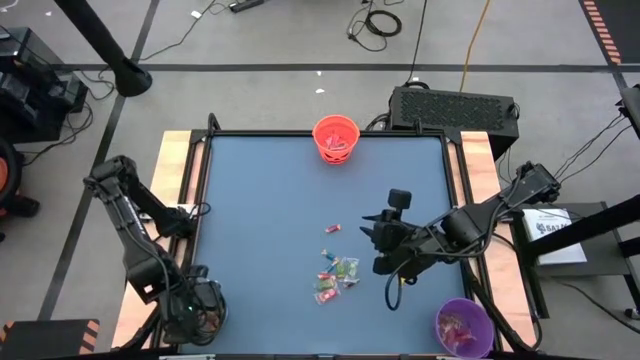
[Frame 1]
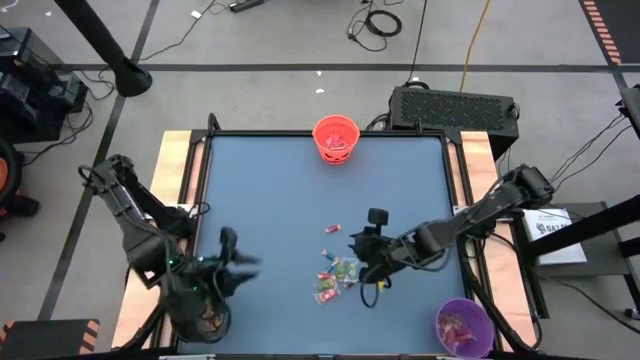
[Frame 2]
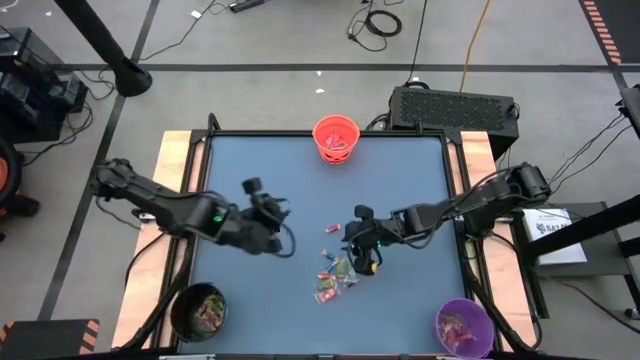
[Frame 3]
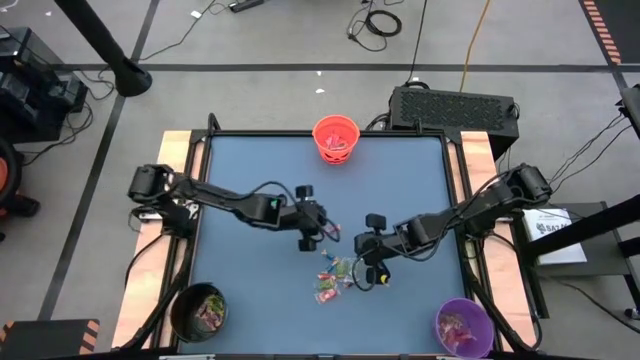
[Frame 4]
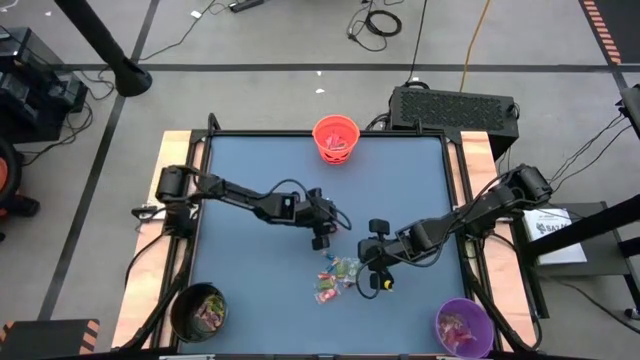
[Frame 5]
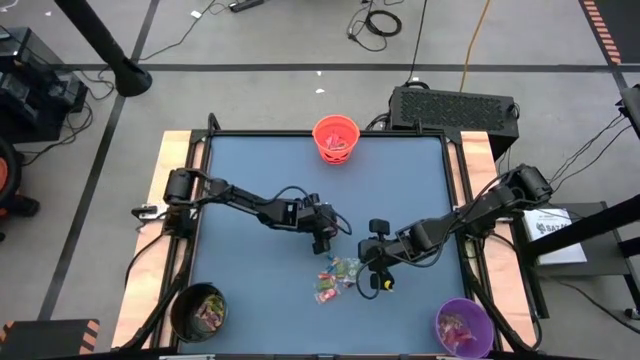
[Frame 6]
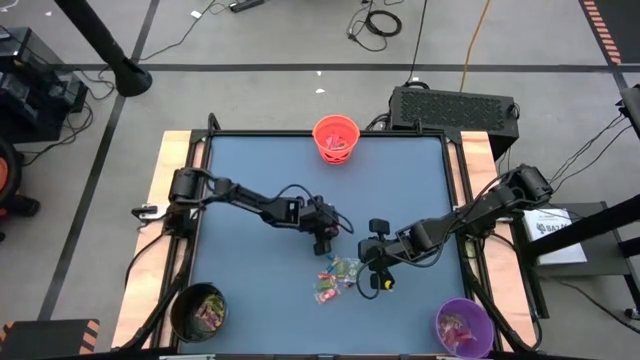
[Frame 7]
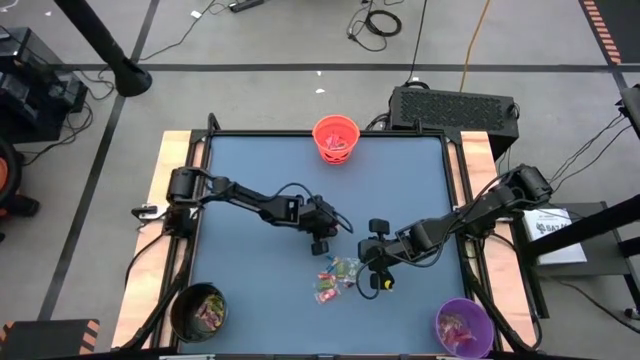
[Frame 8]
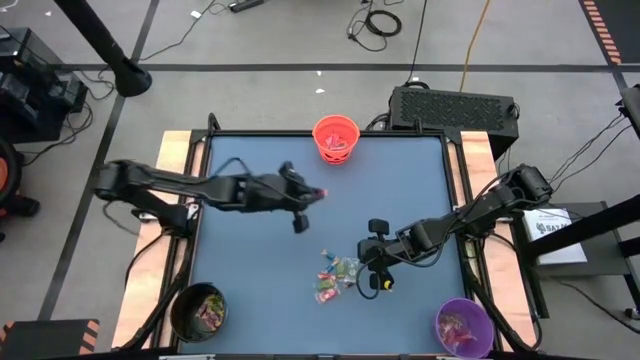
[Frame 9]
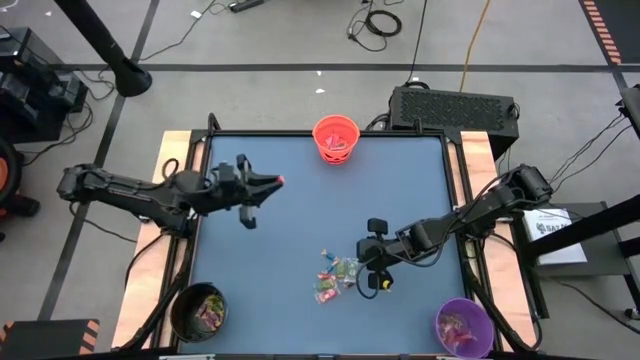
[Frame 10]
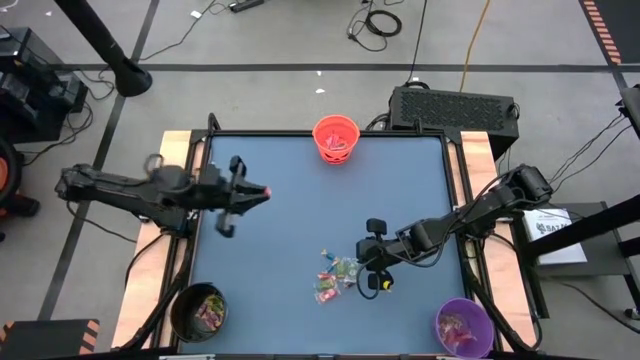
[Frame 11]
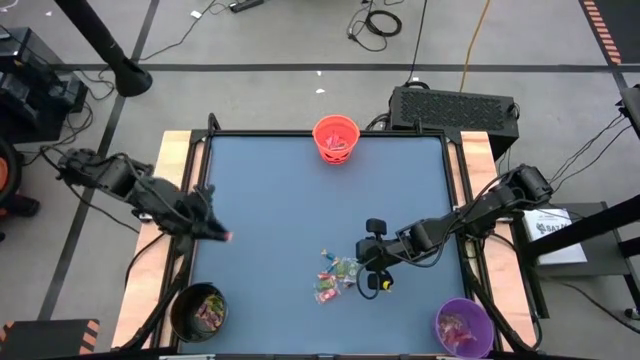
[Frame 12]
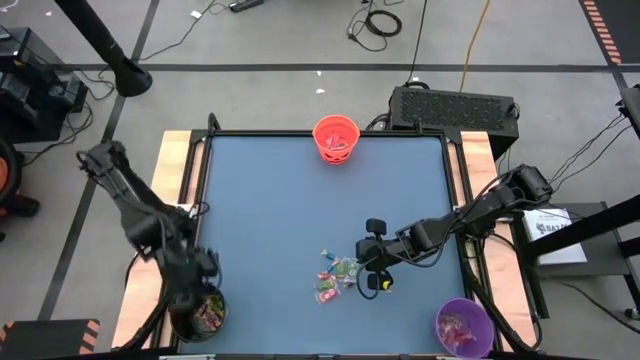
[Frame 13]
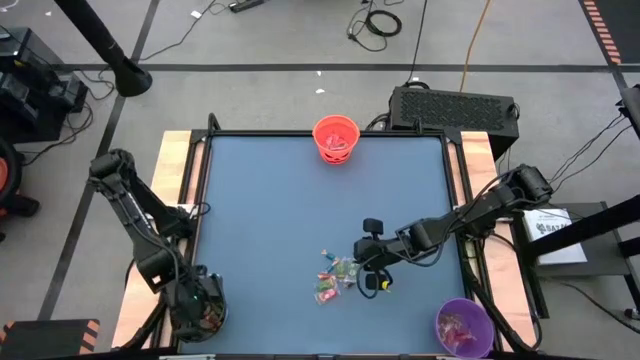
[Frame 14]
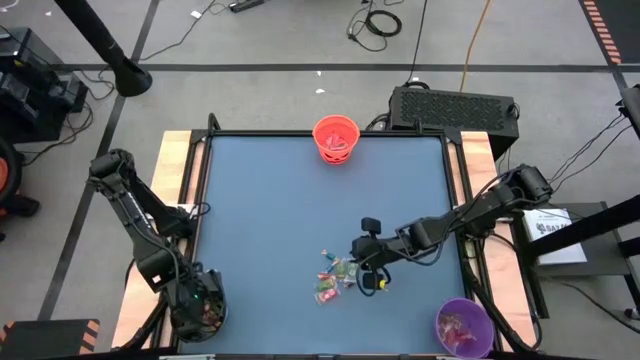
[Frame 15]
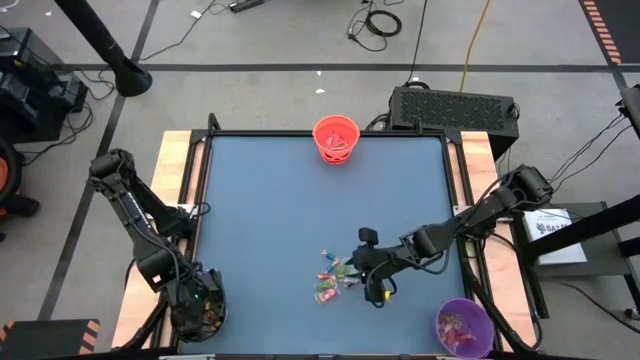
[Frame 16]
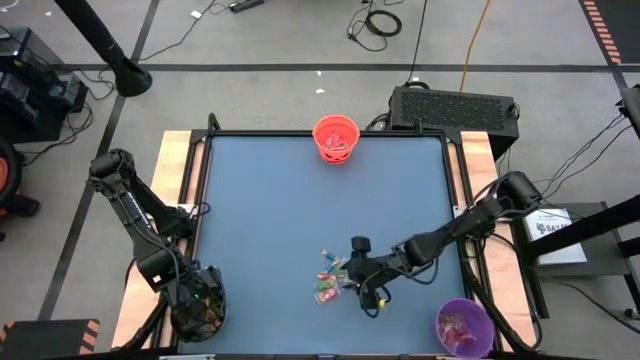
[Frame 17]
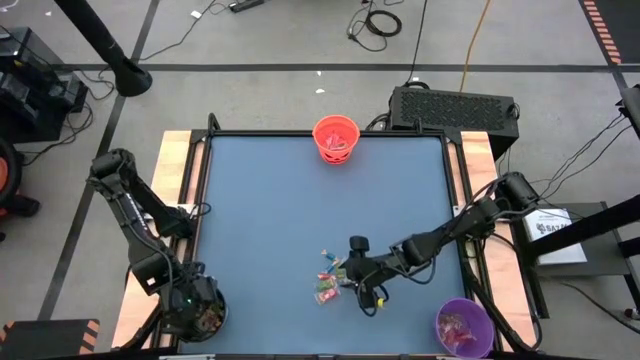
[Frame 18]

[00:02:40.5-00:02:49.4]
Task: Sort candy by brand, put in halloween buckets
Put the red candy into the black bucket

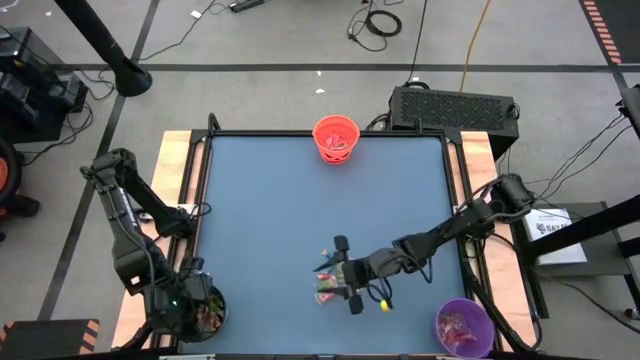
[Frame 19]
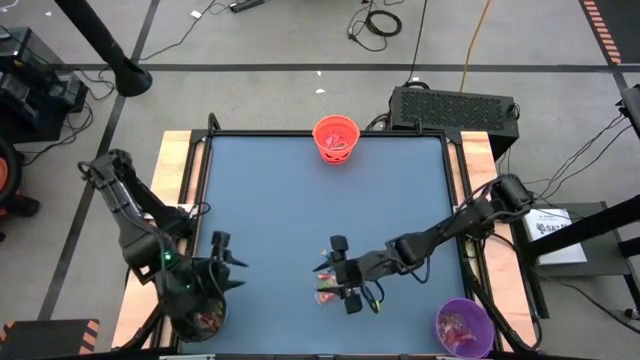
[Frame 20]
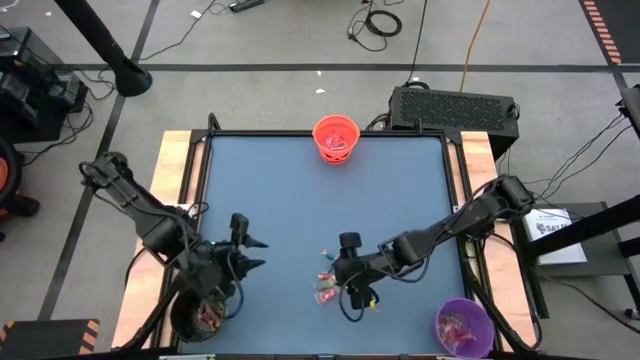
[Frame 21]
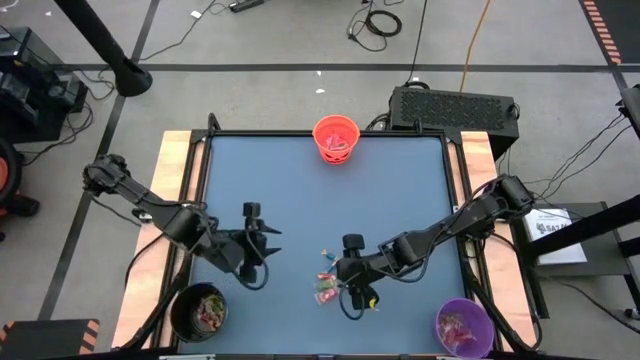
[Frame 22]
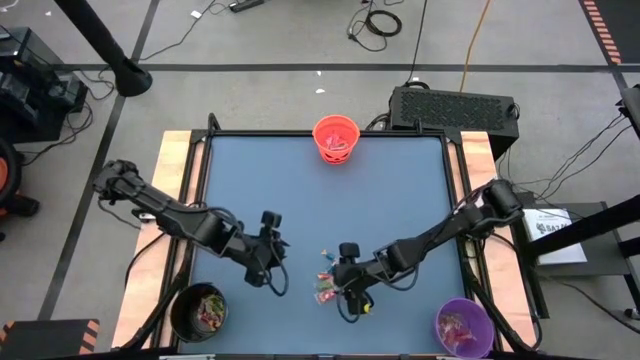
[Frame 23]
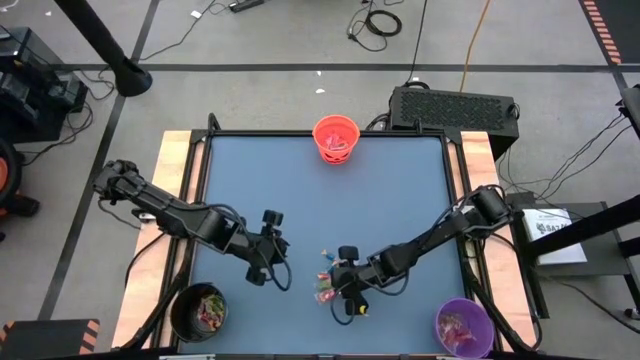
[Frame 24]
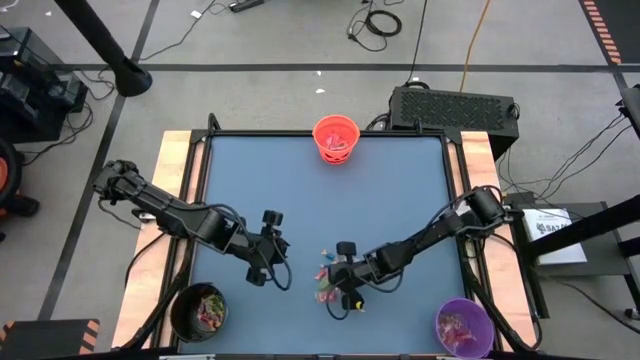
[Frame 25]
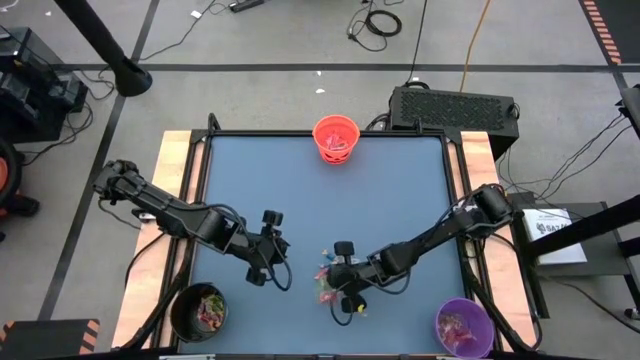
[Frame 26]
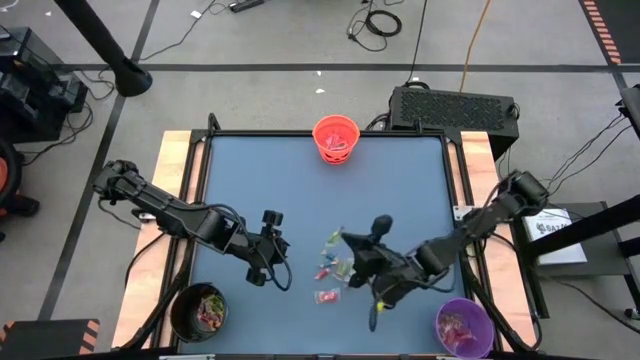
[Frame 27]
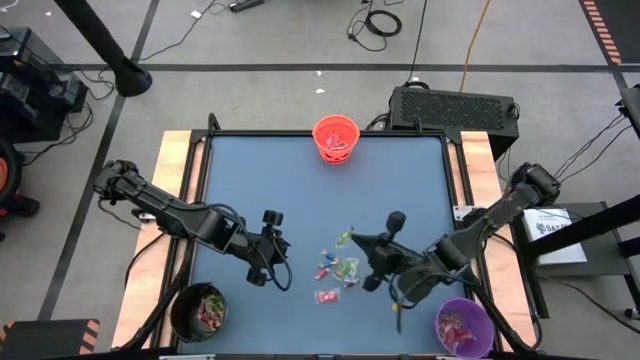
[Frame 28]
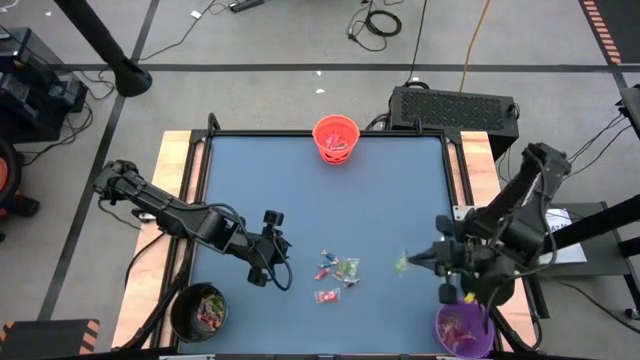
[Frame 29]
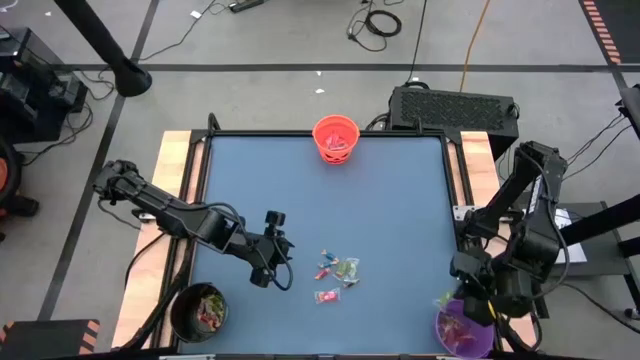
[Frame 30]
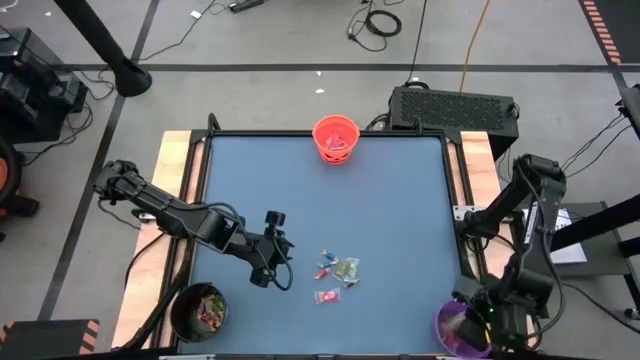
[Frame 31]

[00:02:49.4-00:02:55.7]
Put the small green gummy into the purple bucket

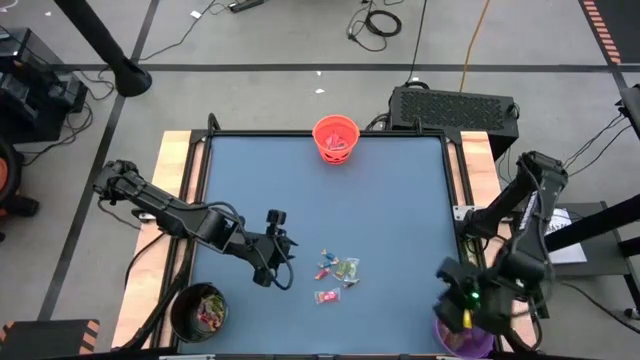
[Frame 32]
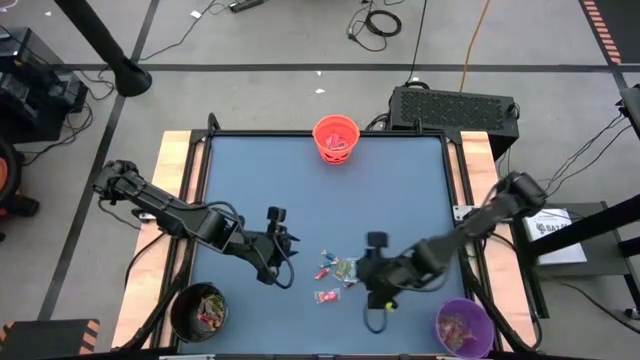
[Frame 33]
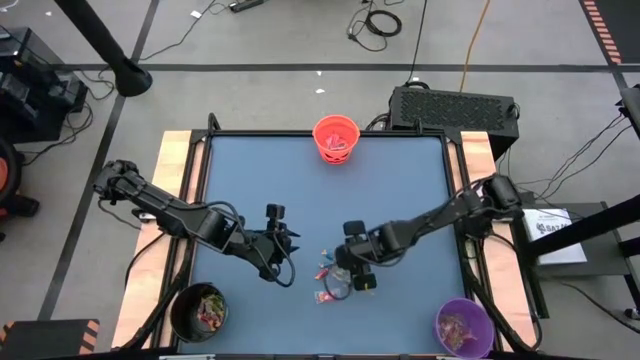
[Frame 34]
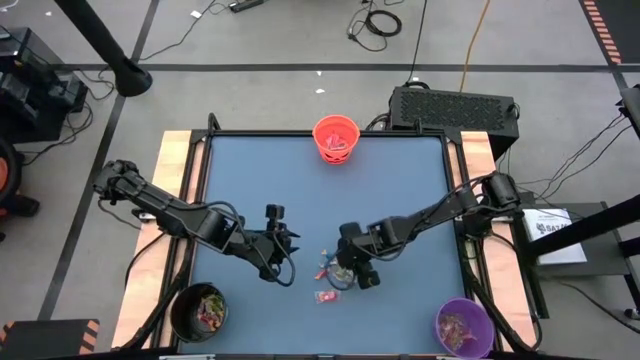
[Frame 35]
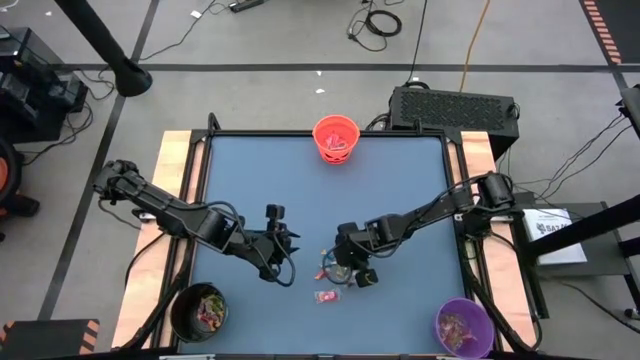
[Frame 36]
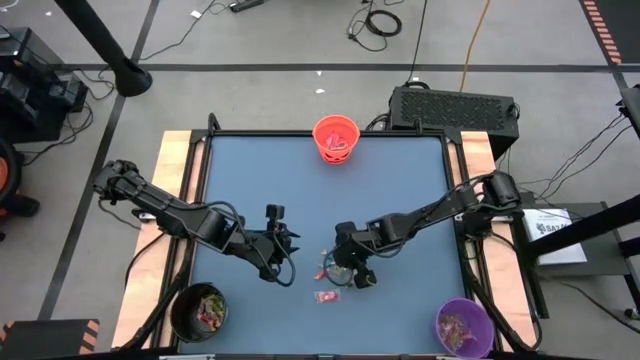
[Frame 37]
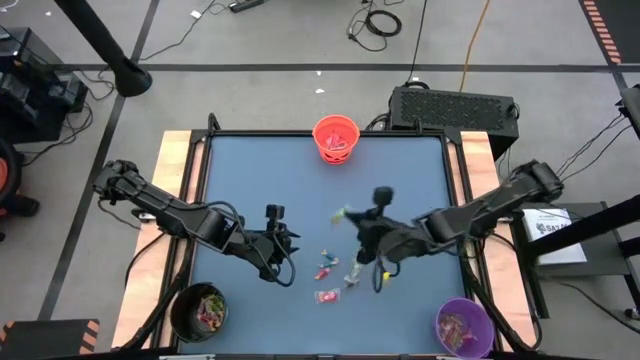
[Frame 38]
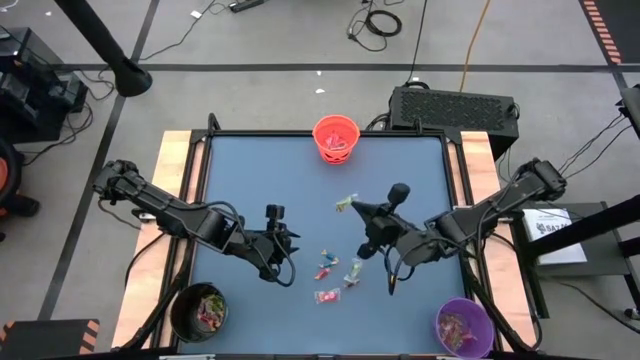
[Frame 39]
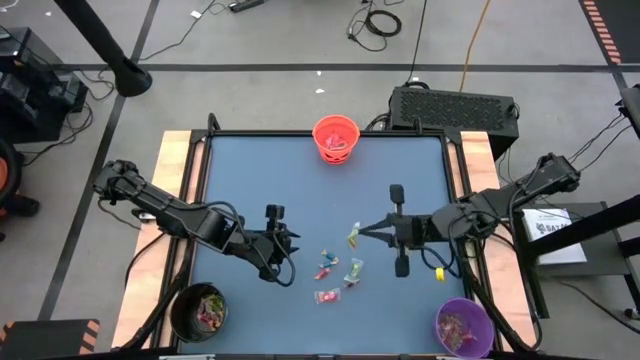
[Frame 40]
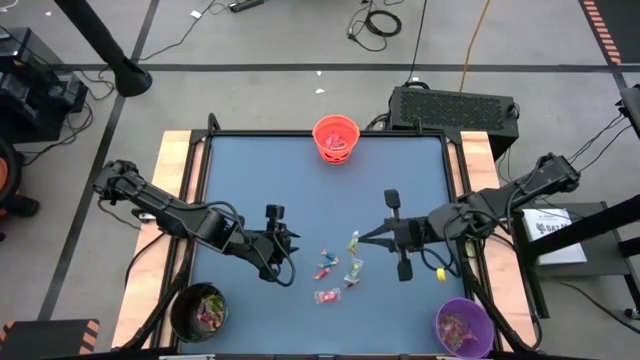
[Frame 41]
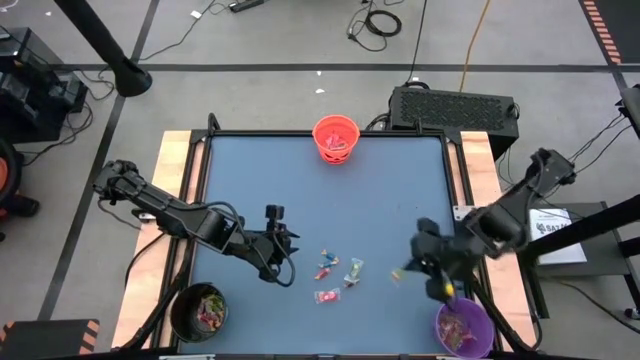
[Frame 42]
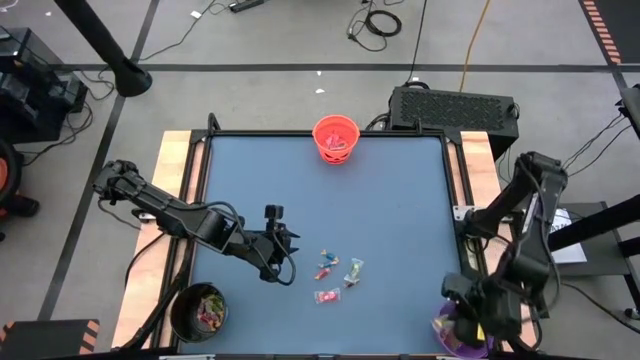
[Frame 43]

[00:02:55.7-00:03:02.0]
Put the small green gummy into the purple bucket
